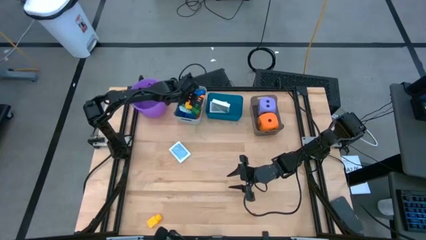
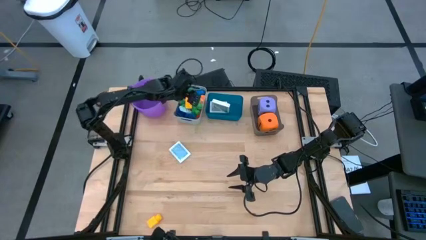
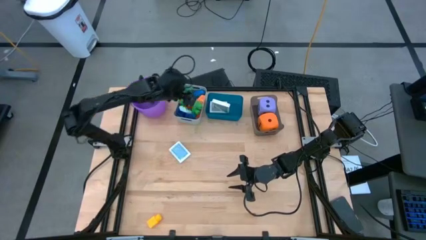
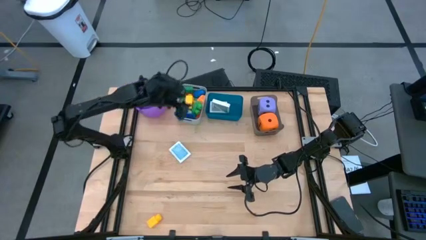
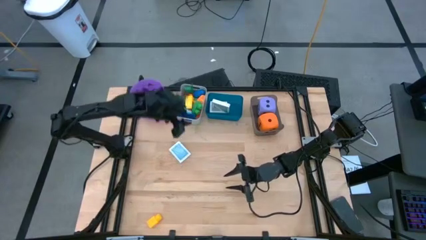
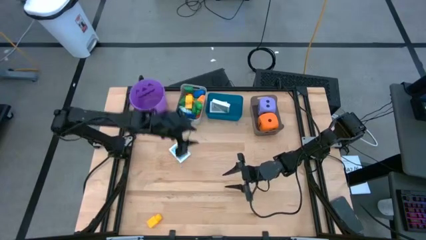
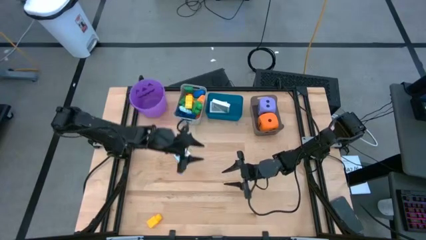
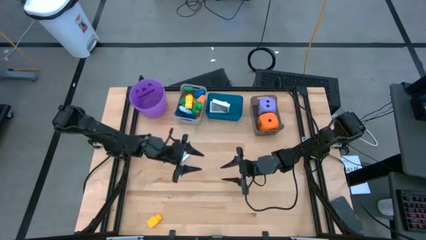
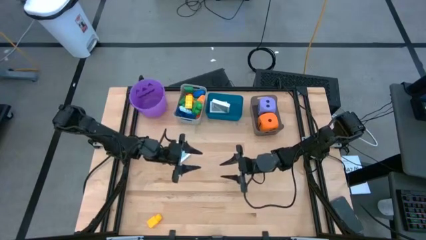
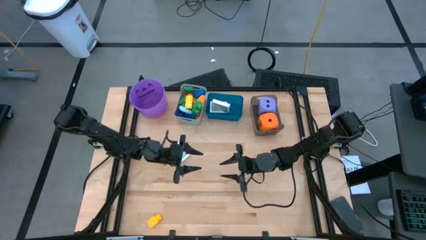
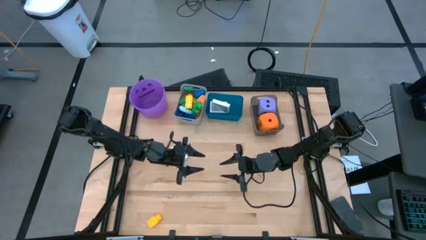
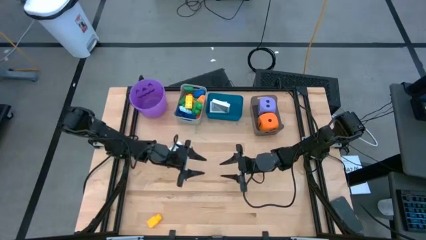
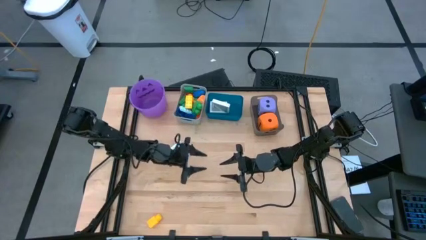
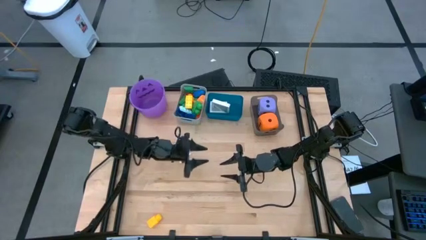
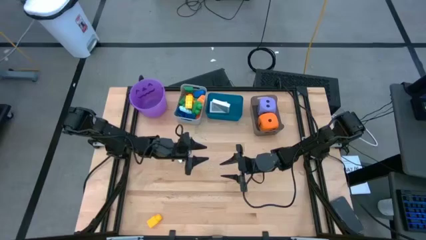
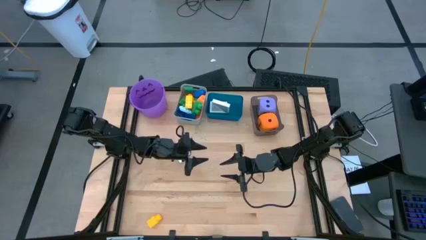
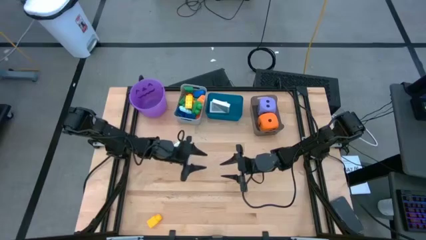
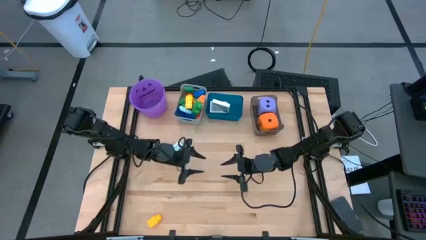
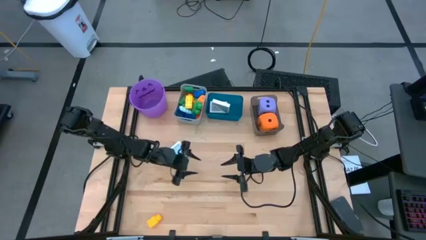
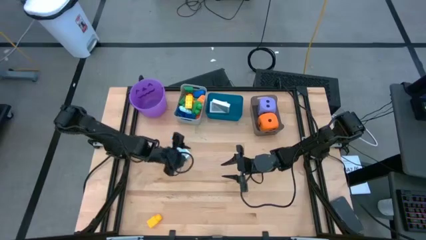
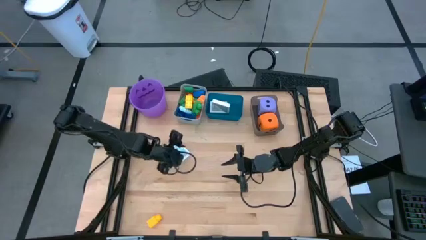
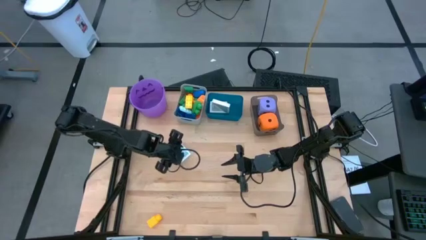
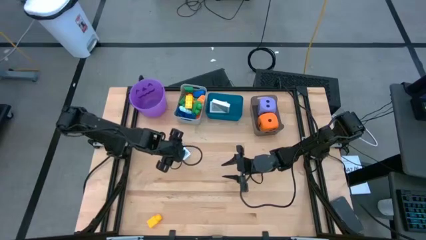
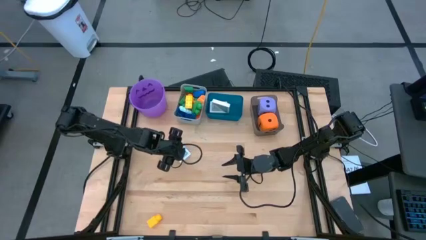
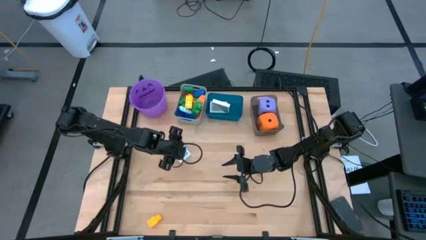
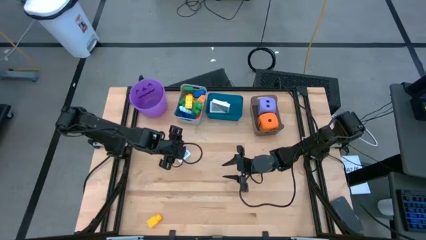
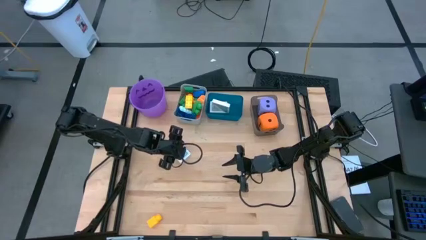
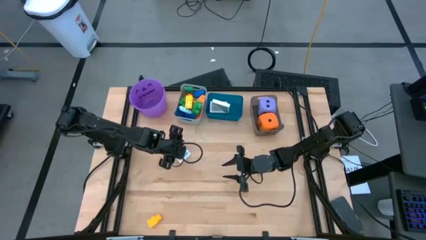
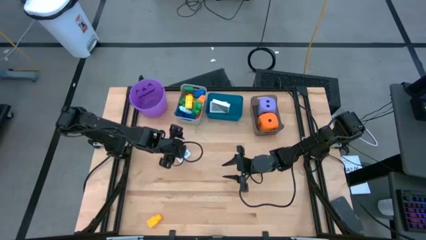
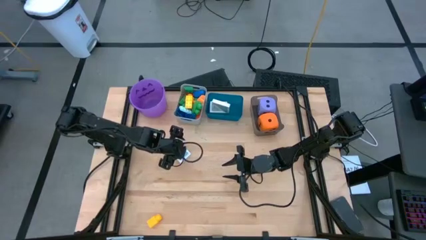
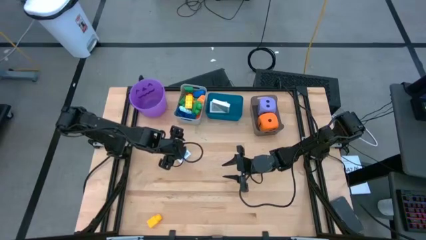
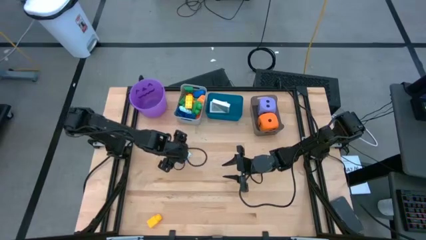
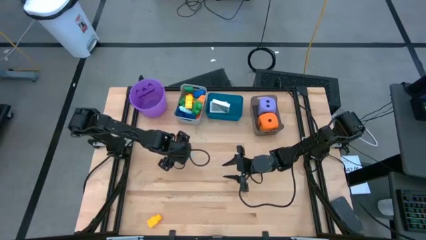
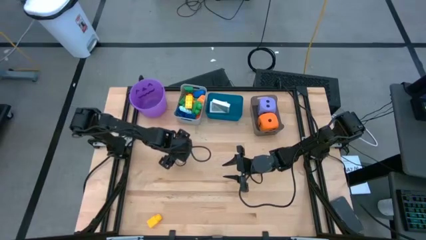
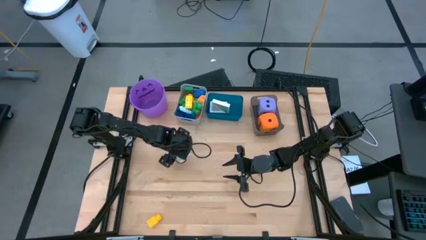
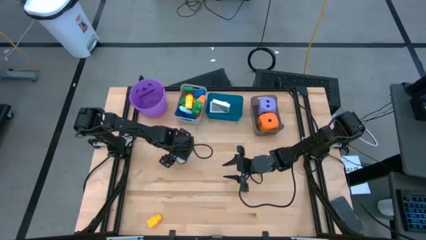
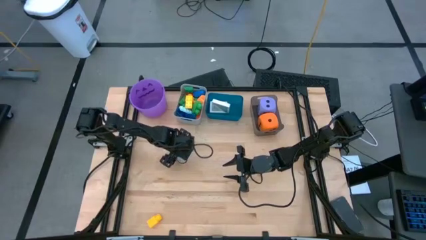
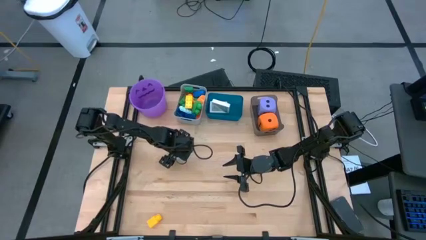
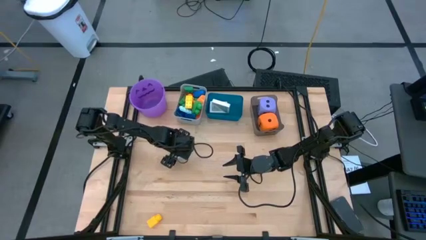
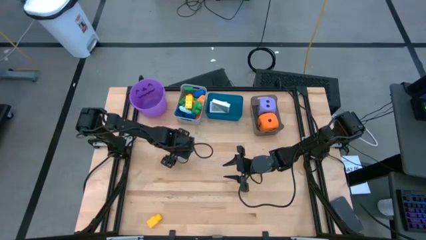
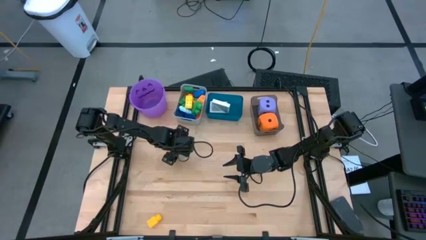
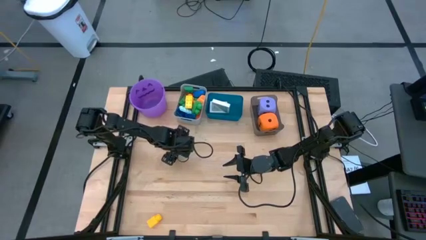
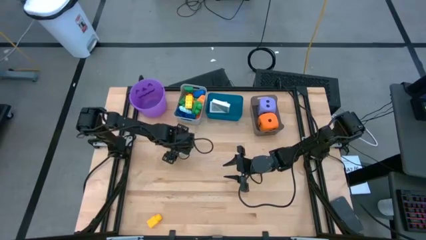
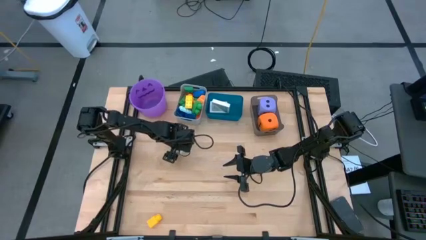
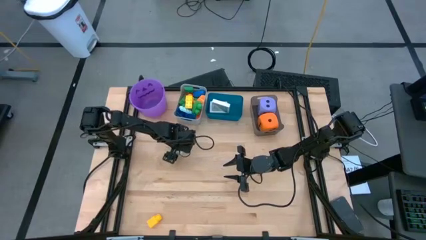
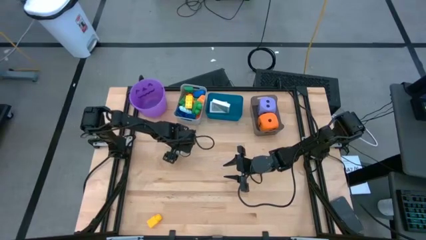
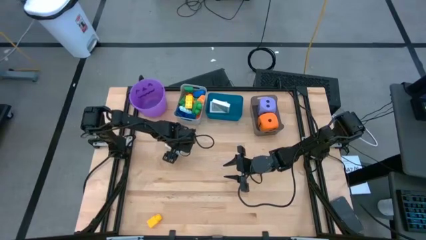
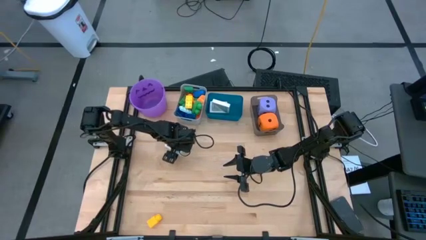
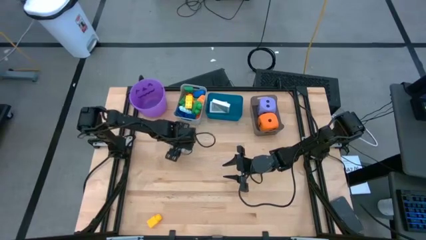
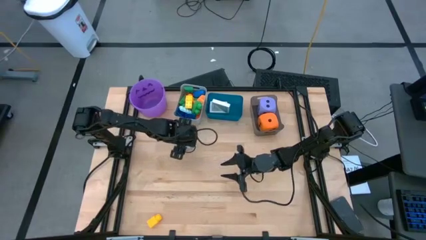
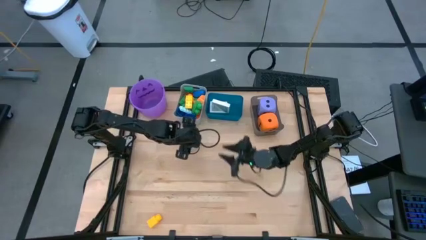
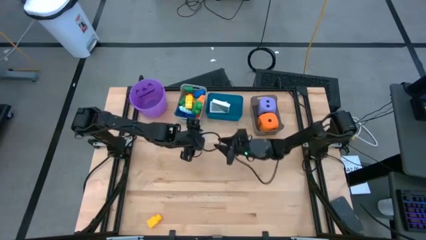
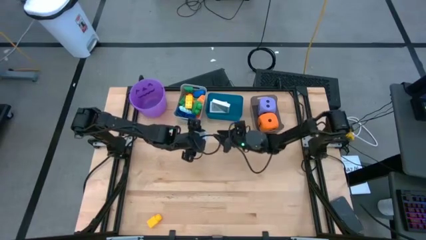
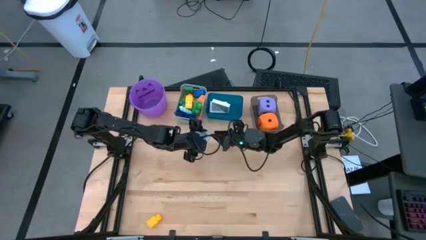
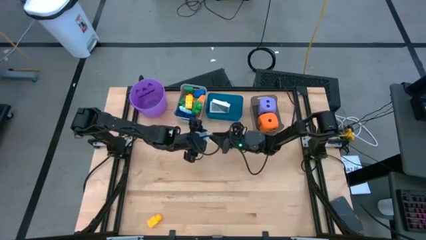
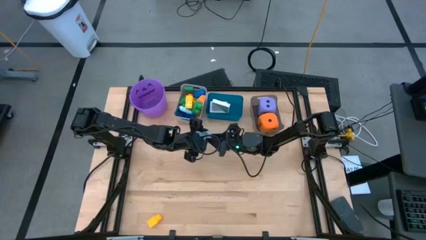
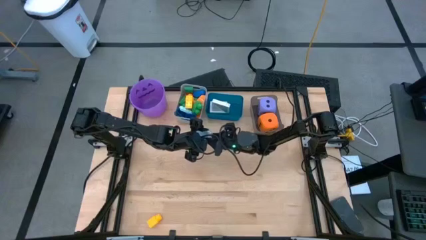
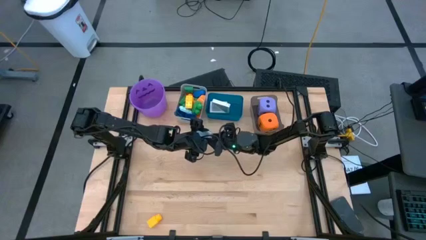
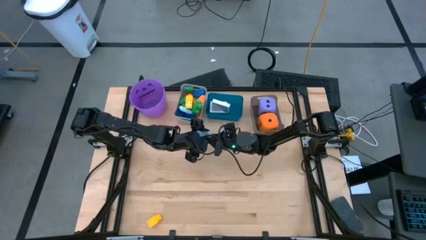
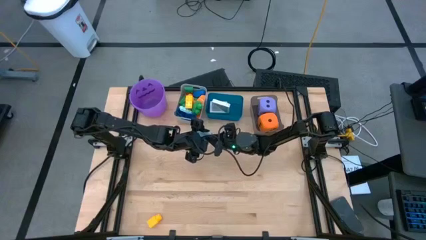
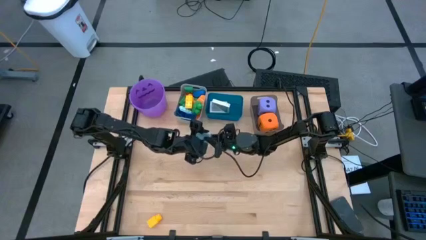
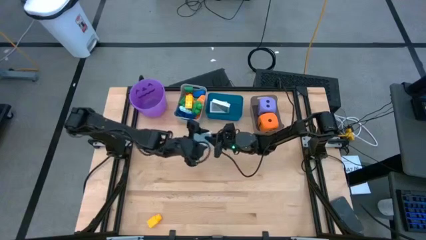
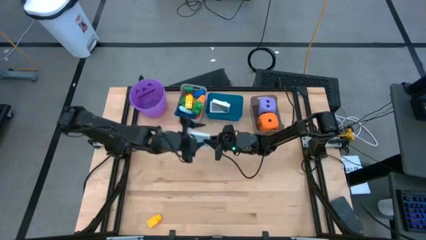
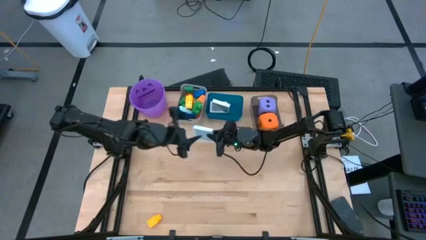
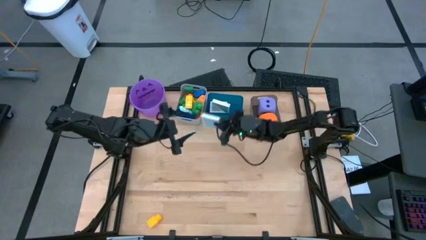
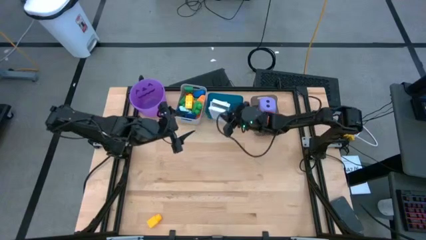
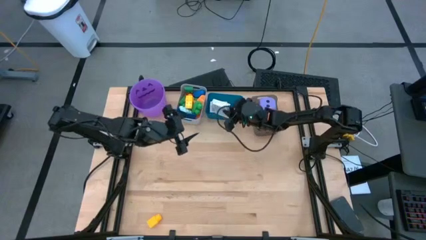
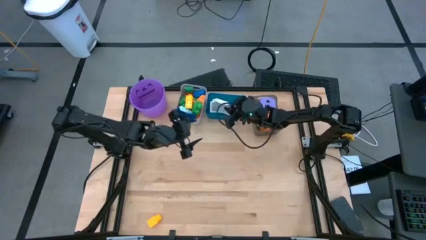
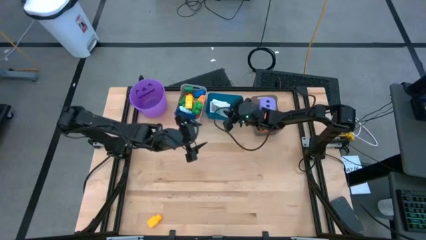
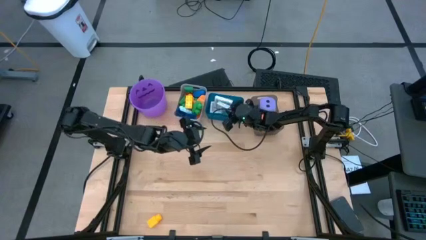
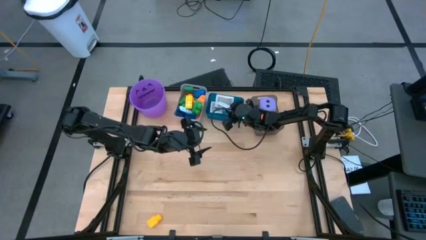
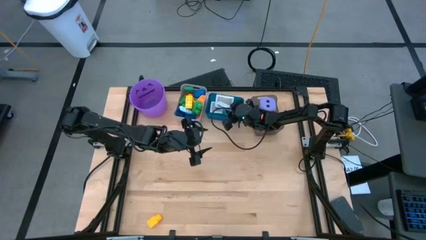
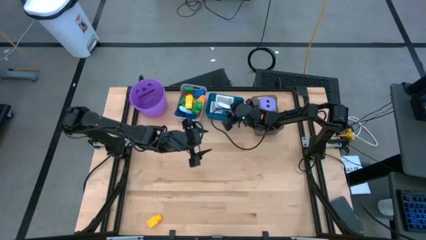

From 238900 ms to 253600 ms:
Task: Pick & Place Toys
Put the light blue deck of cards into the blue bin
